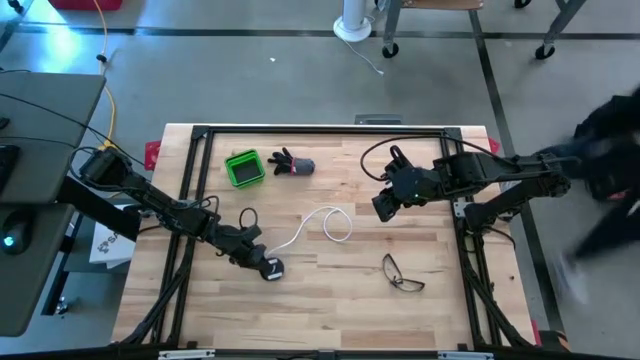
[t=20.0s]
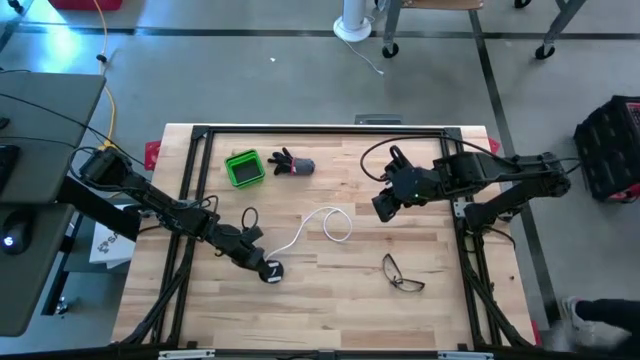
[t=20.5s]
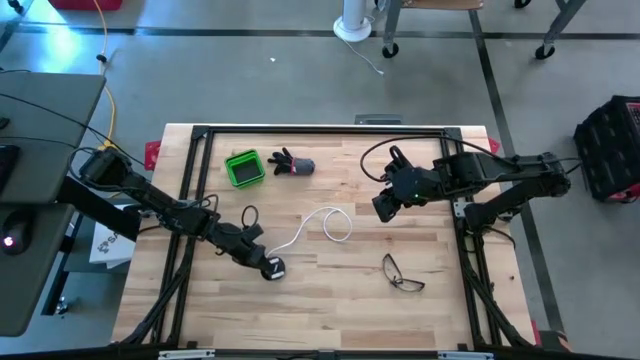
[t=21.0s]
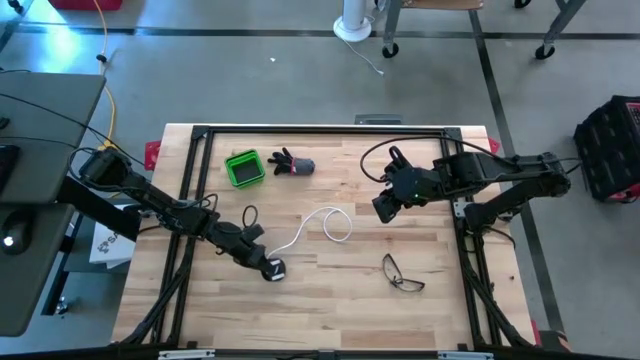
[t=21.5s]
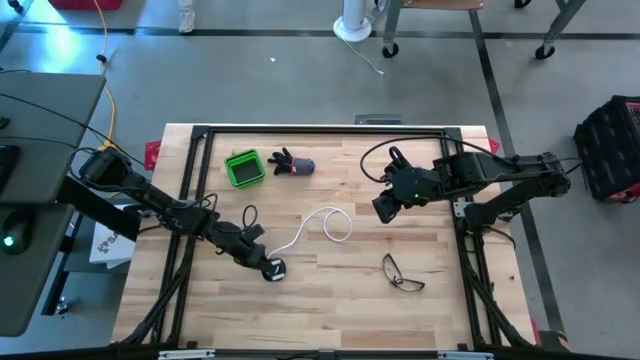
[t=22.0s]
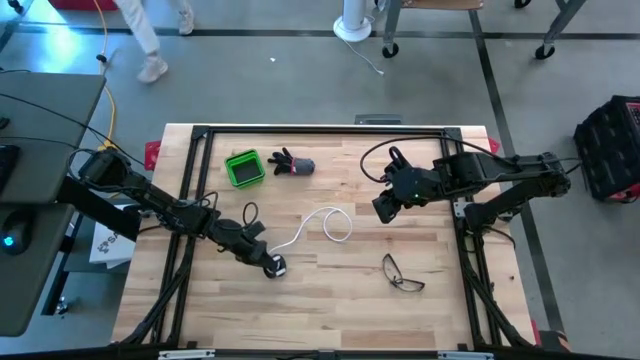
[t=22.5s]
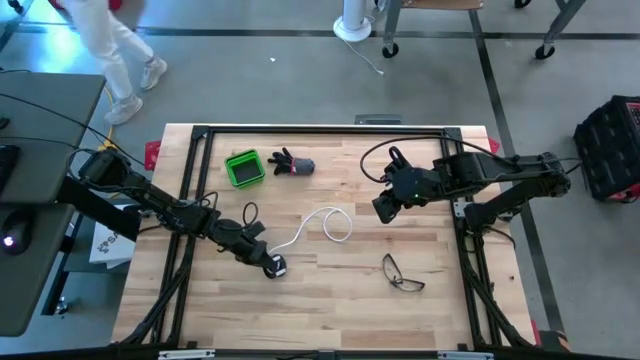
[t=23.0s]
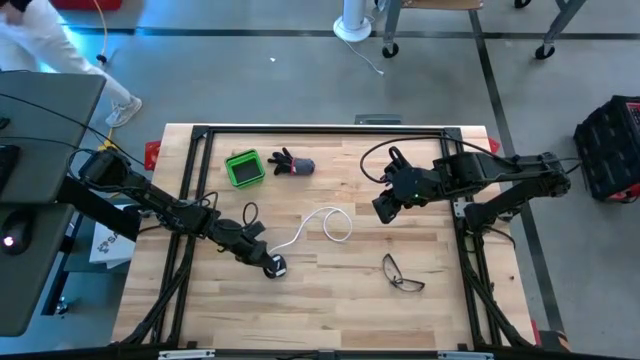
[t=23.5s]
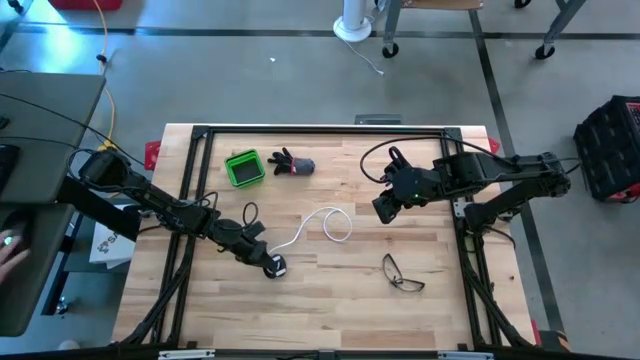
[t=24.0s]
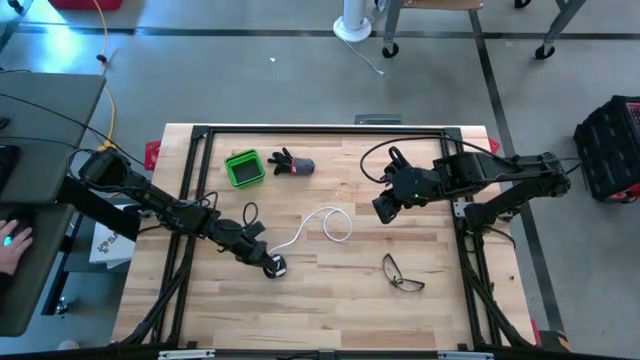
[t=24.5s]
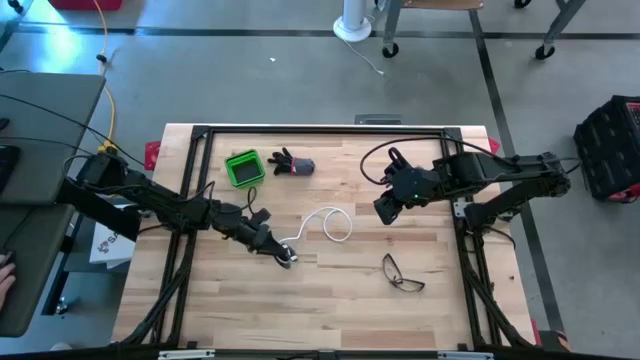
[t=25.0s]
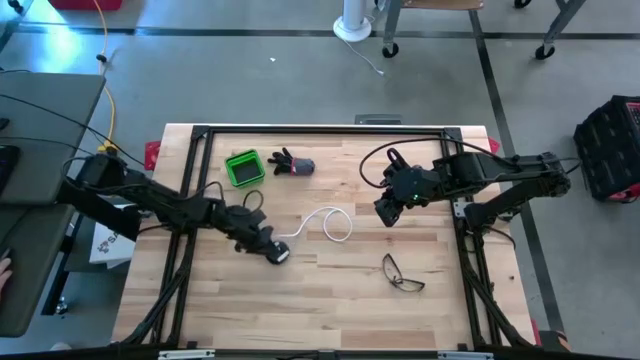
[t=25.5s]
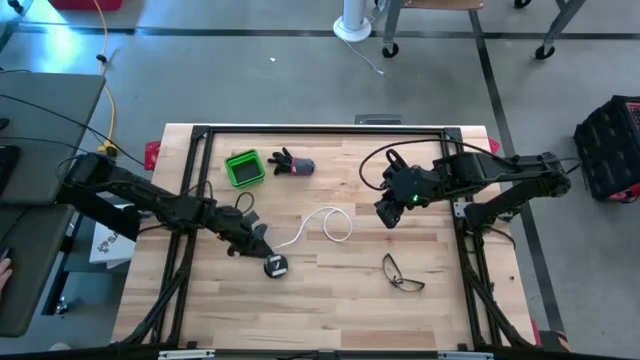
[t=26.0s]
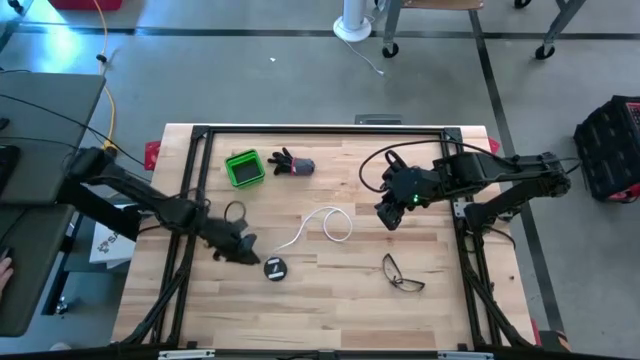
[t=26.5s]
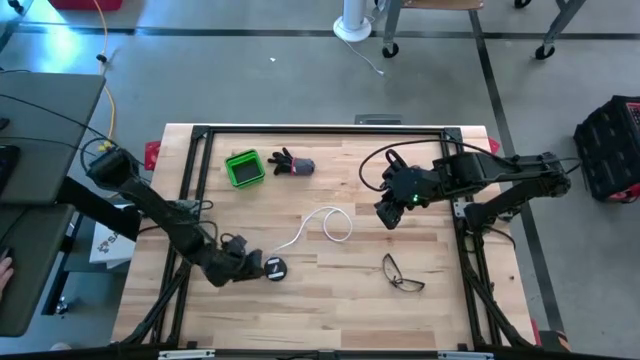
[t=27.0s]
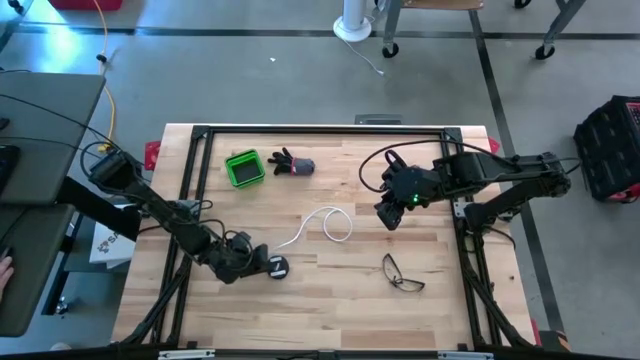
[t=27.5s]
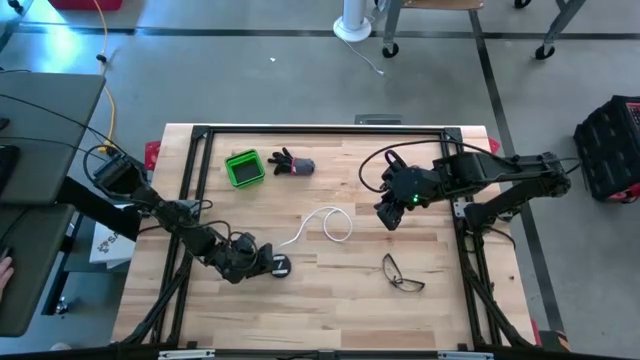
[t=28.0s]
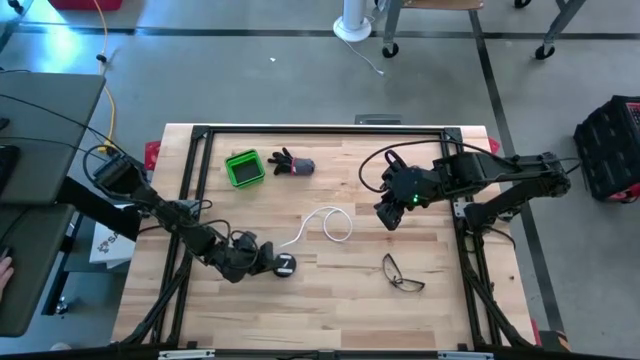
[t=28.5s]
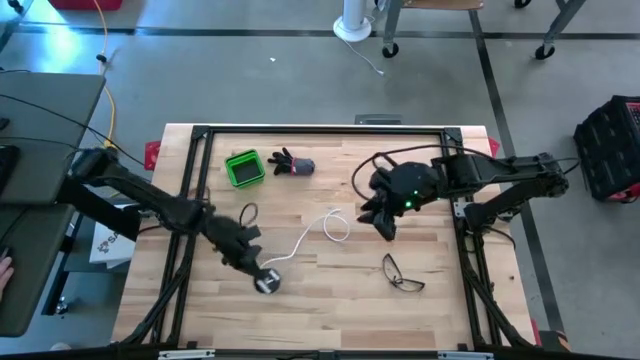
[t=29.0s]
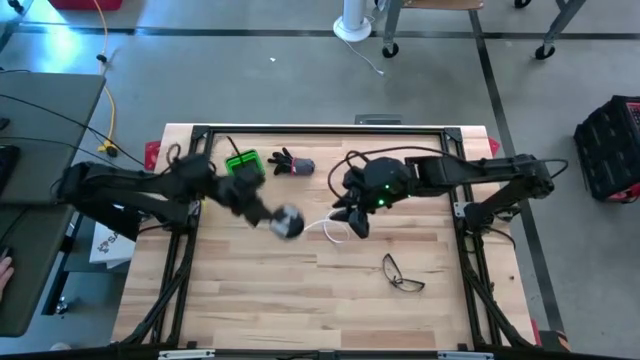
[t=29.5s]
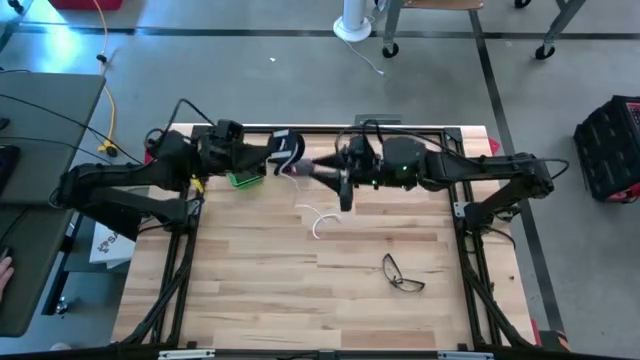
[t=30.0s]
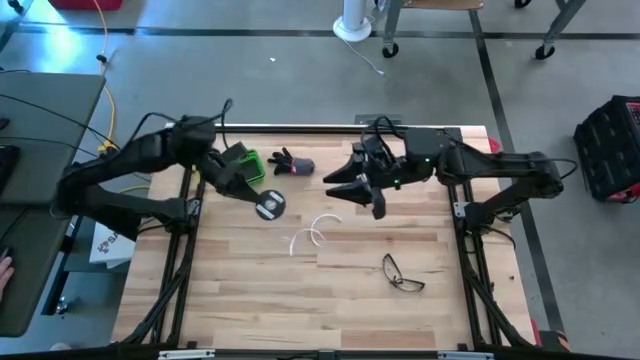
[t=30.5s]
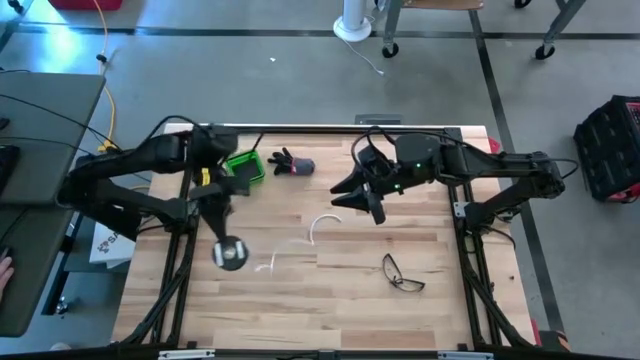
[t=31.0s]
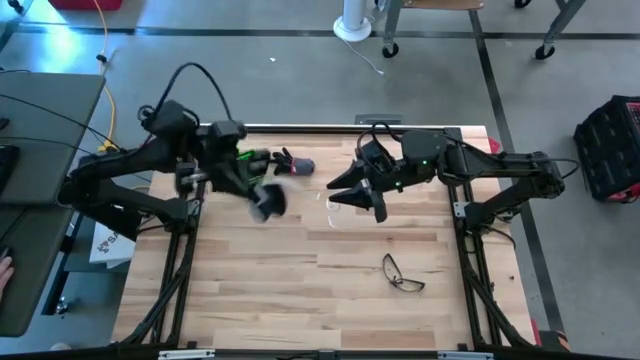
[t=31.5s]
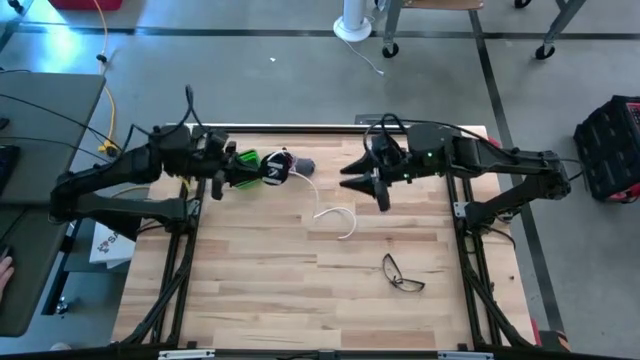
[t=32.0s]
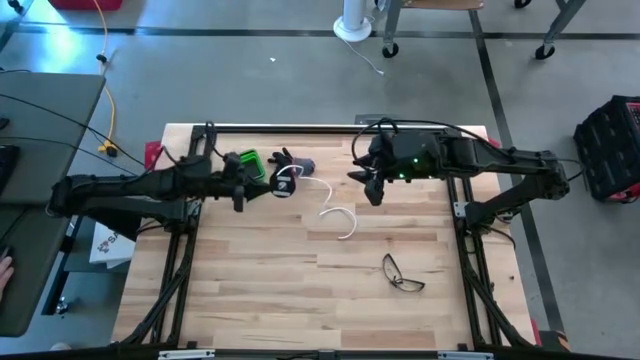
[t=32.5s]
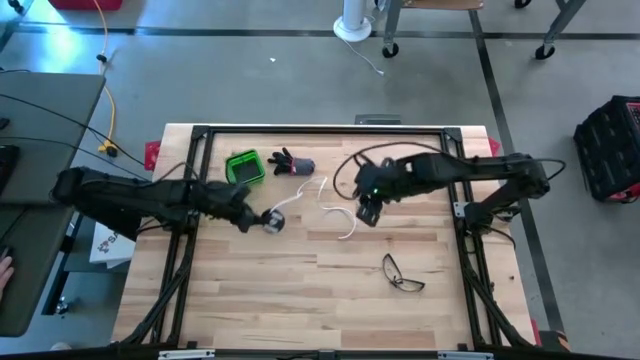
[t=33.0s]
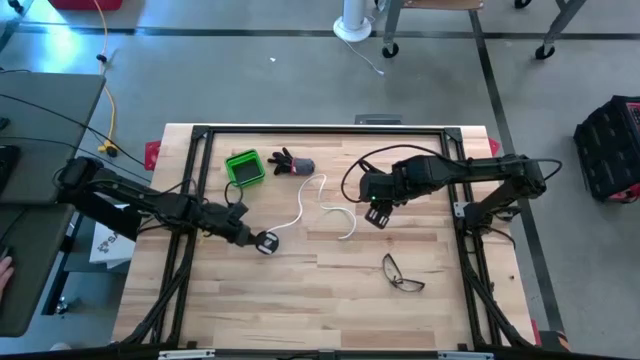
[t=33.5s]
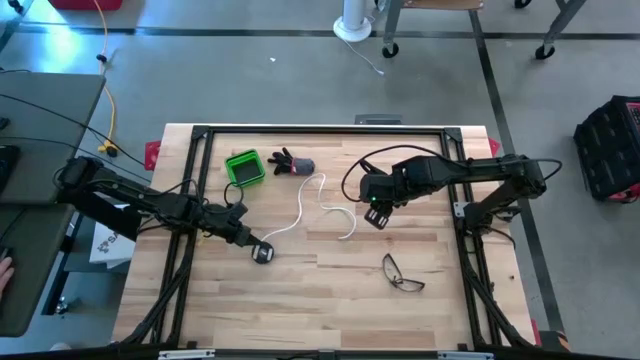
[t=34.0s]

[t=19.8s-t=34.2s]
Task: Coil cords
Uncoil the white wire from the spool

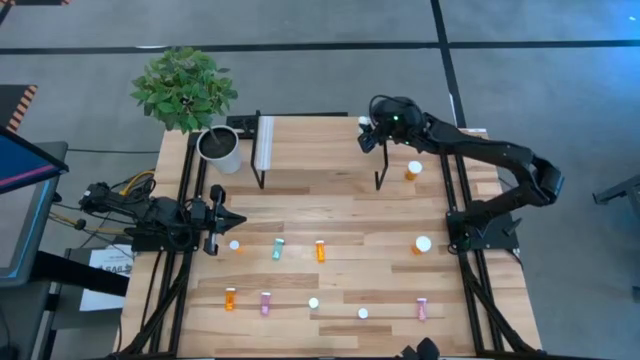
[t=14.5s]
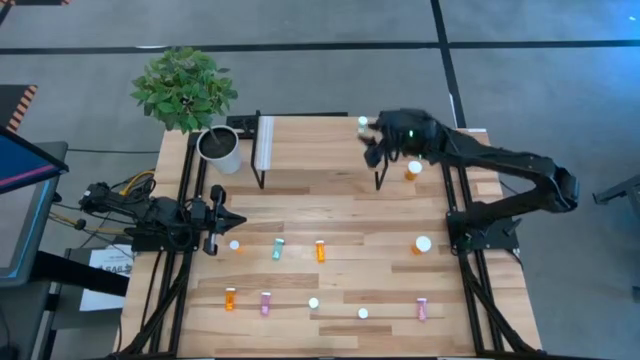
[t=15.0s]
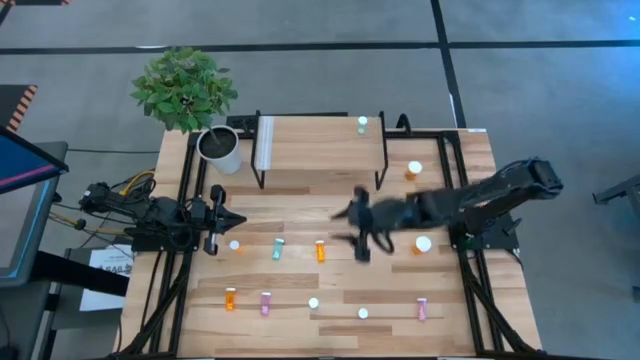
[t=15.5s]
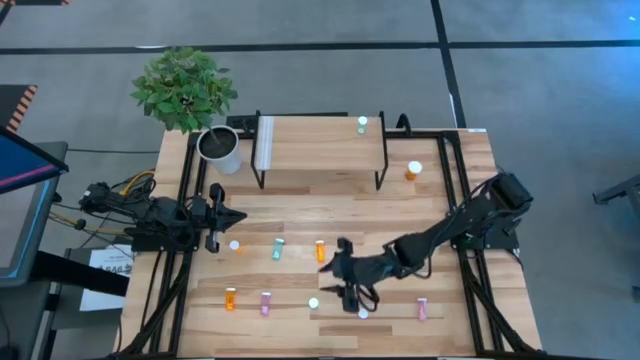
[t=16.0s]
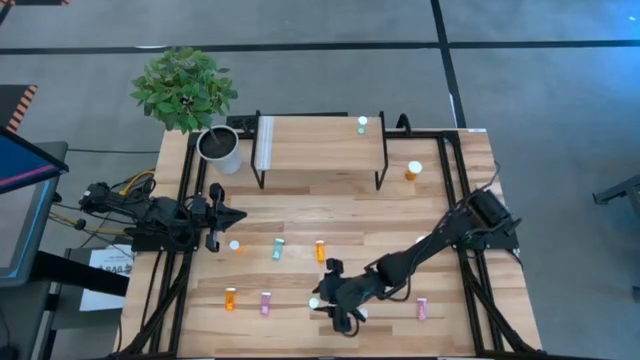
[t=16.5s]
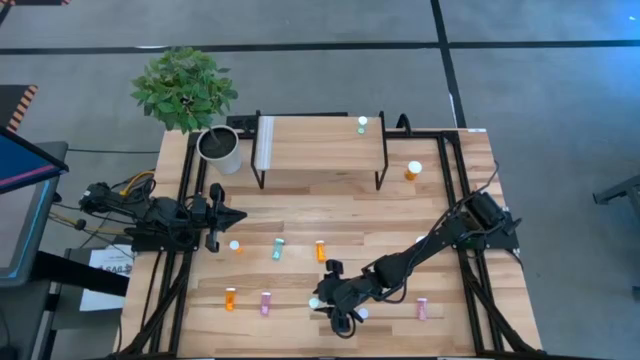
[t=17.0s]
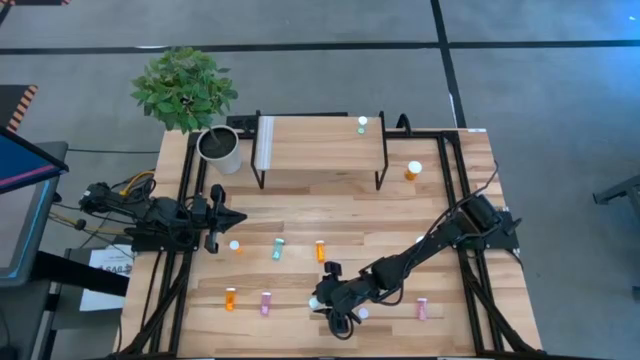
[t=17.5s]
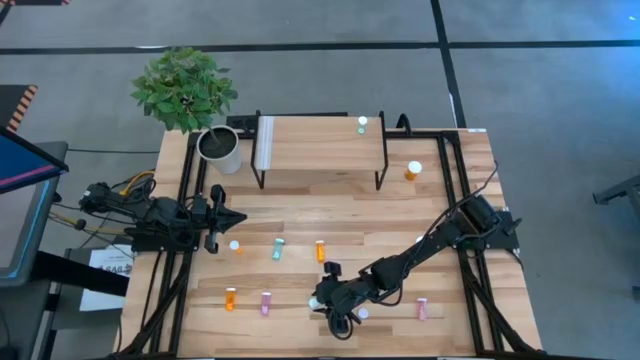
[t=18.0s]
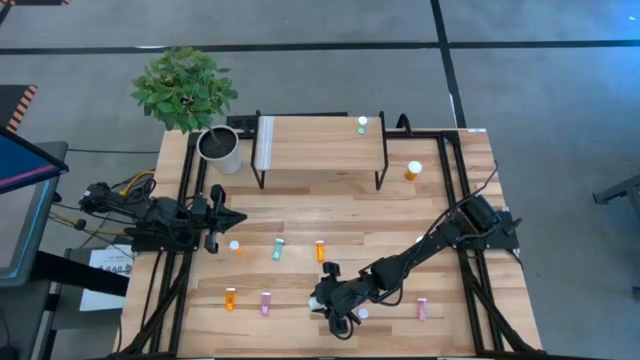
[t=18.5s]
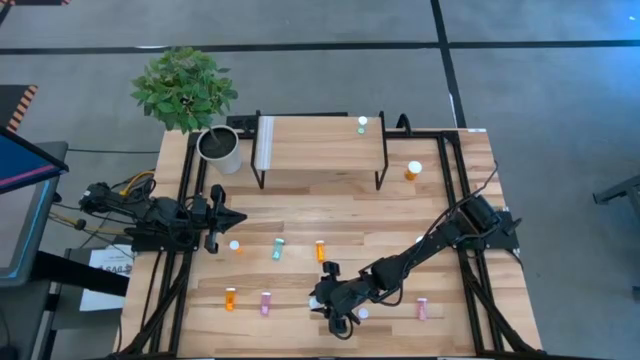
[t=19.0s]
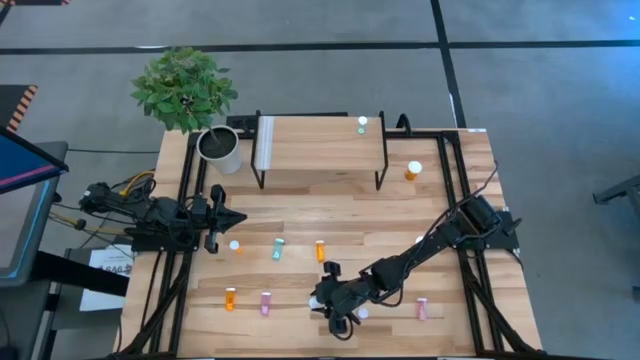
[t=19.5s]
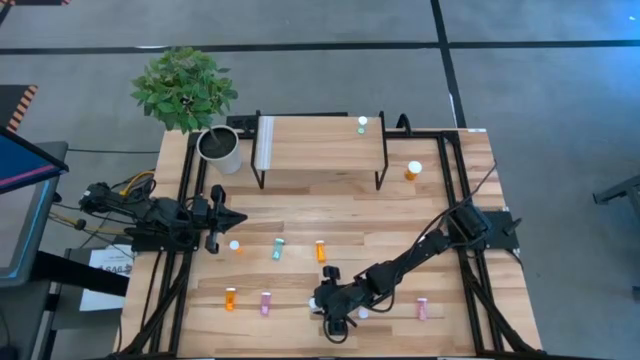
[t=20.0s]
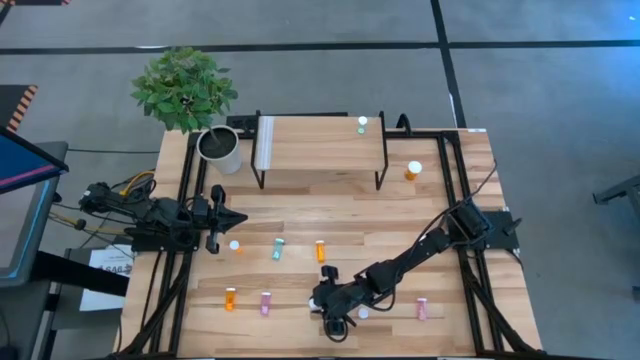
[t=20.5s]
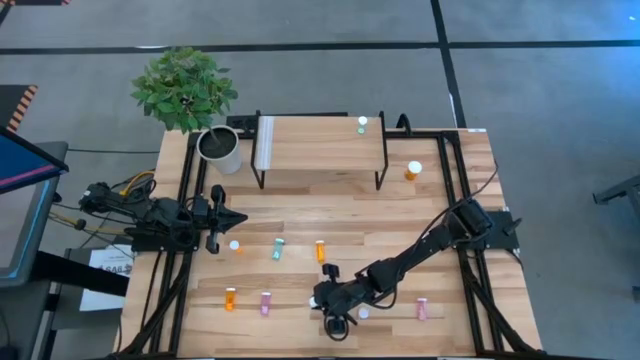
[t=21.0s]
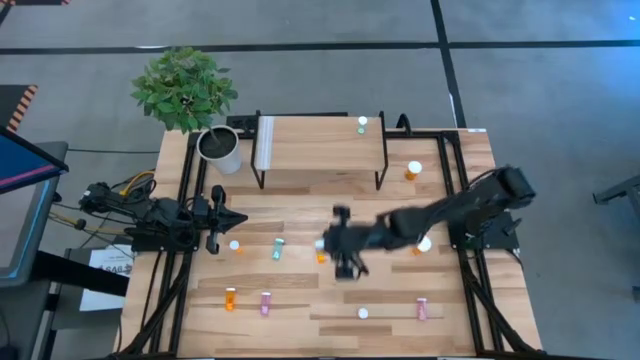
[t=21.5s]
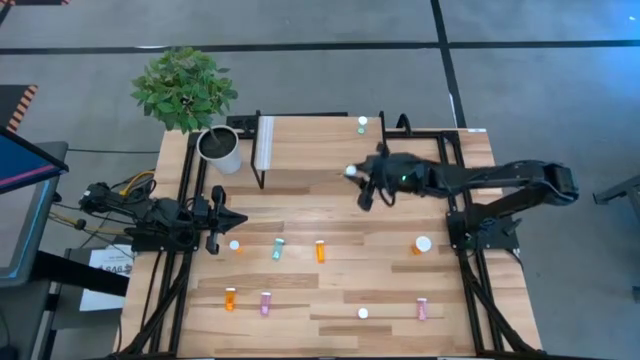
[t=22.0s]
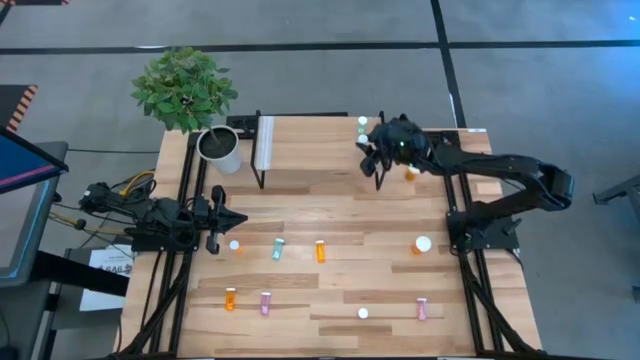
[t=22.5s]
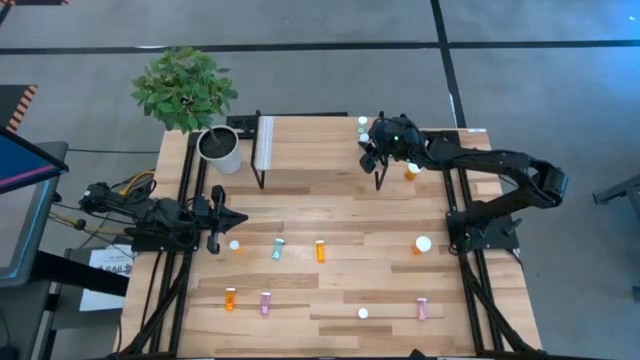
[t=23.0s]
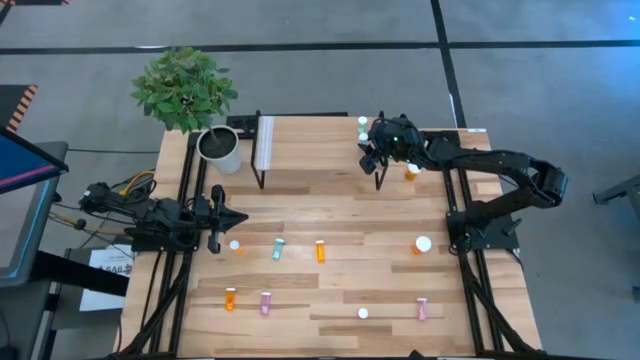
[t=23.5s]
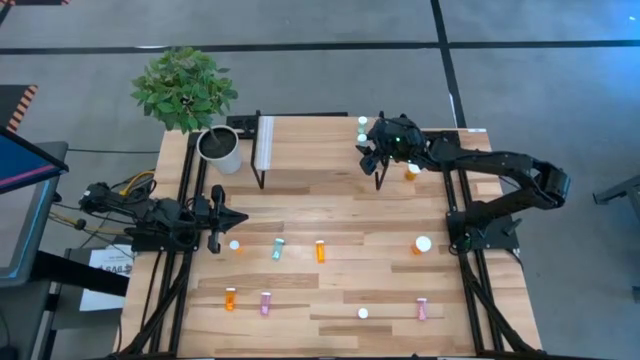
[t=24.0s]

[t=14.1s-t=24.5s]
Task: Pick and place medicine bottles onto shelf by color
Put the bottom blue pill bottle on the shelf aligned with the other blue pill bottle
